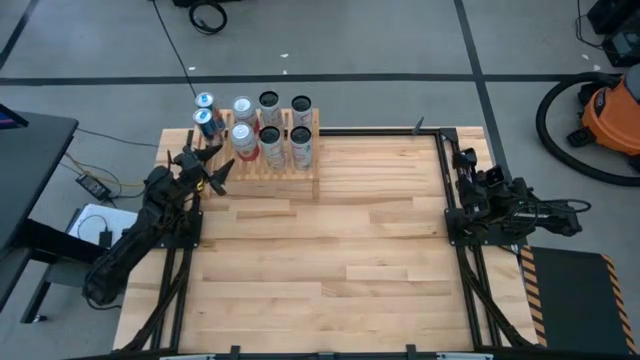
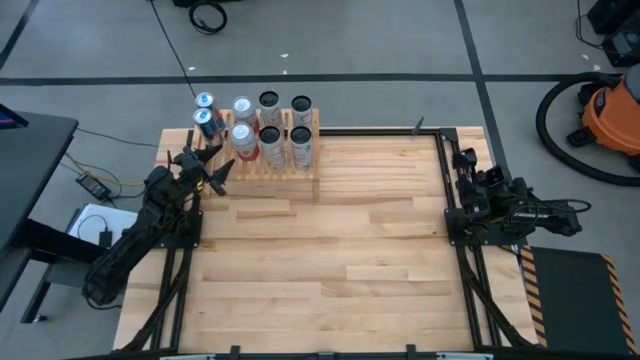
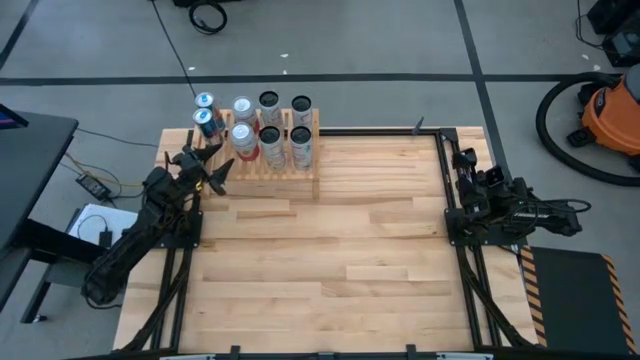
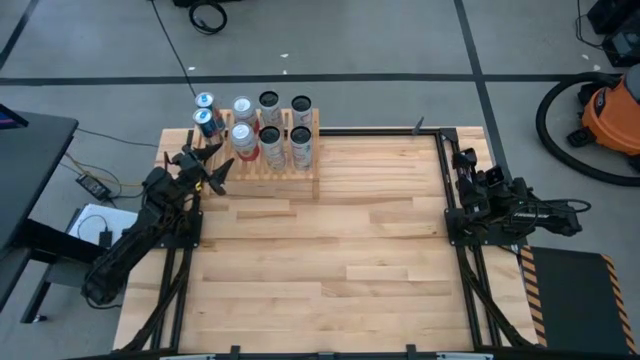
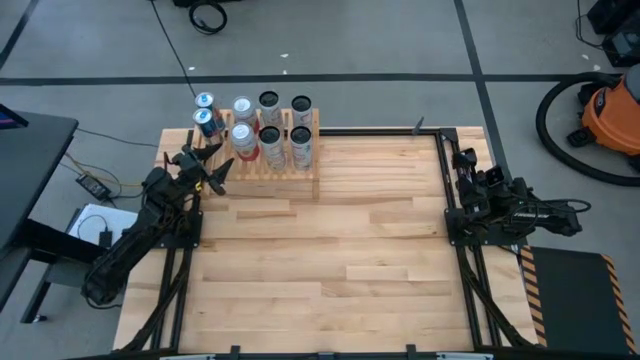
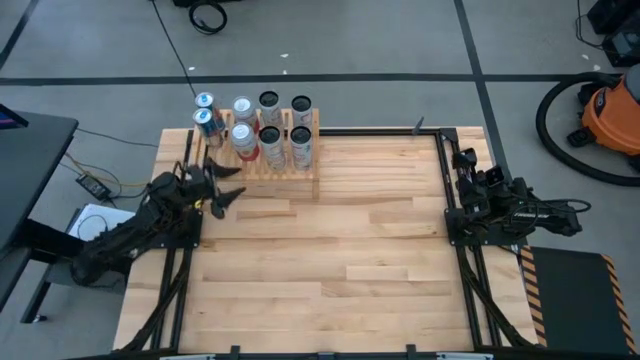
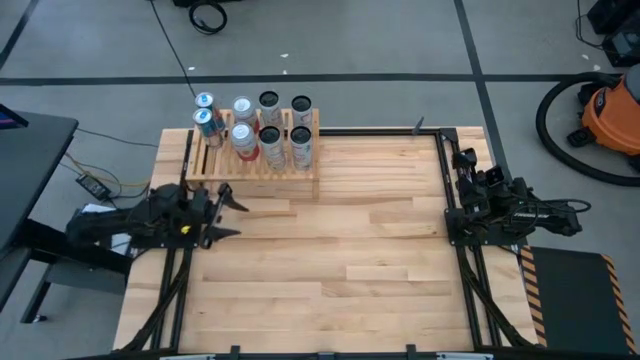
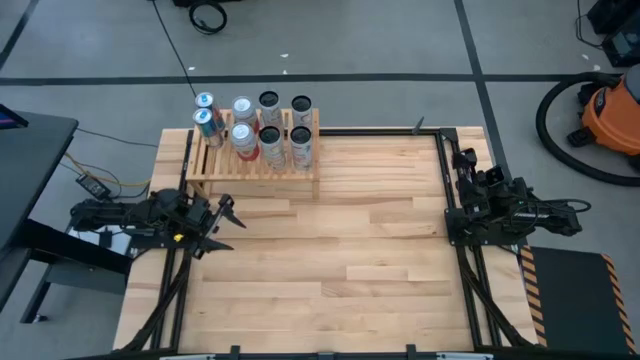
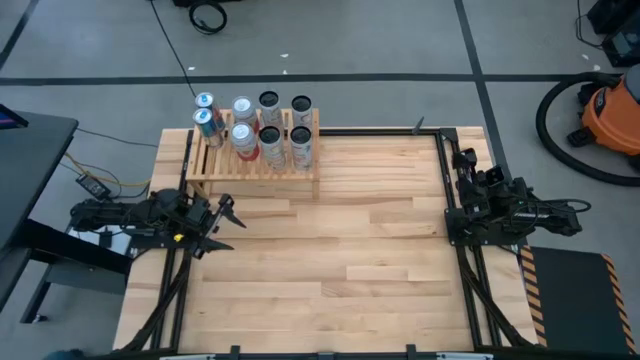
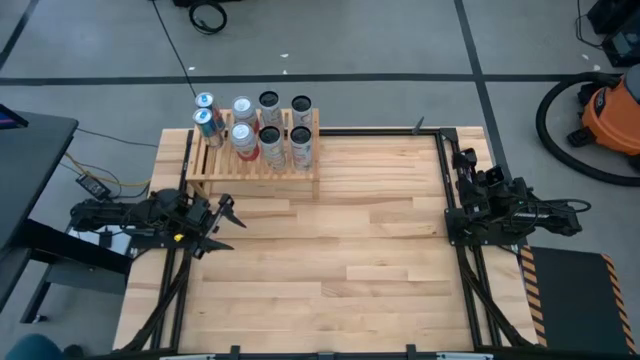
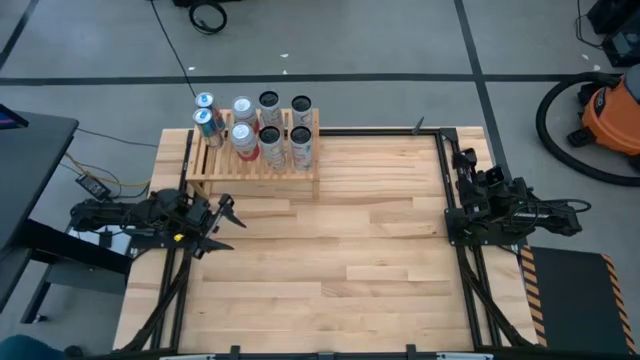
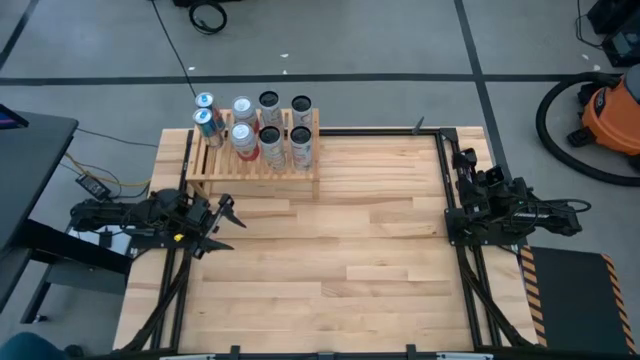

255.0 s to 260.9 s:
Task: Place canned beverage on shelf
Return to Home Position

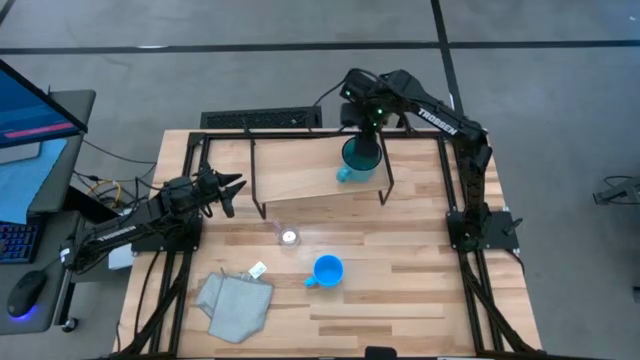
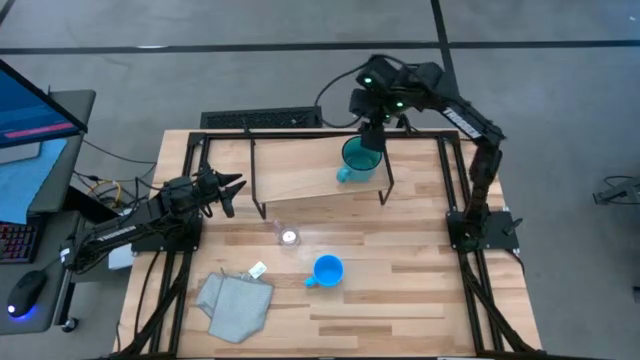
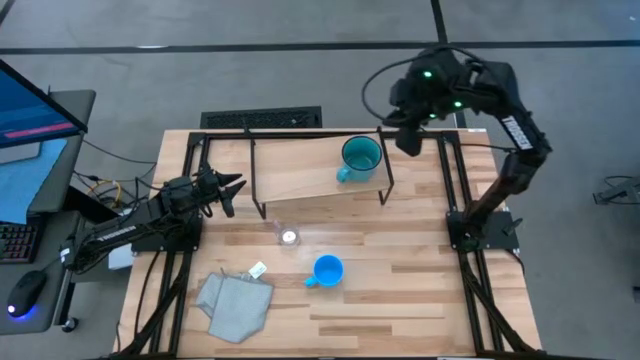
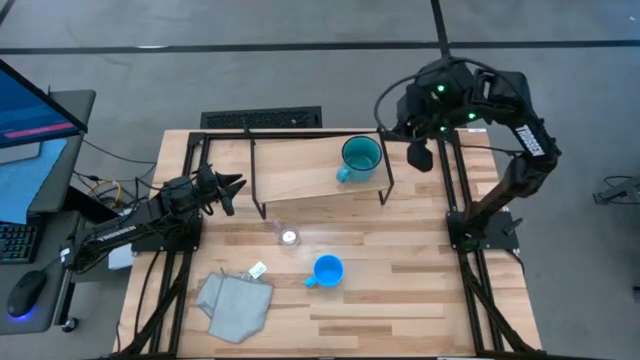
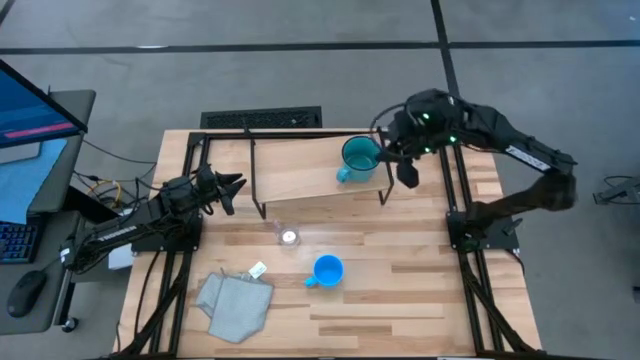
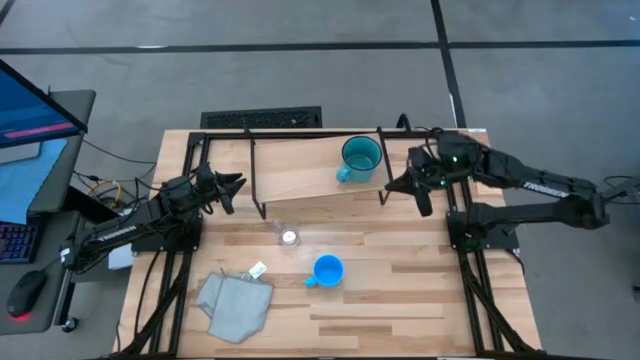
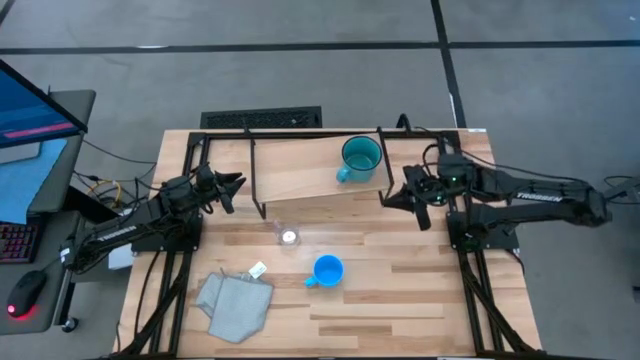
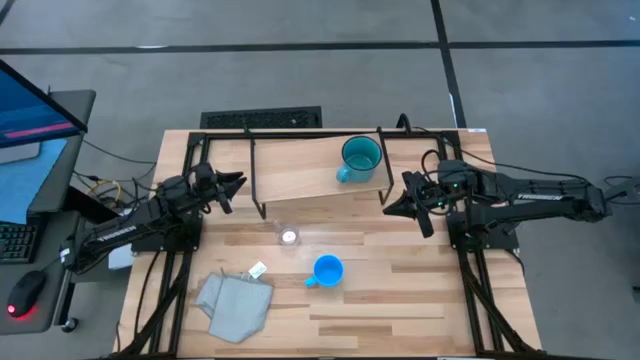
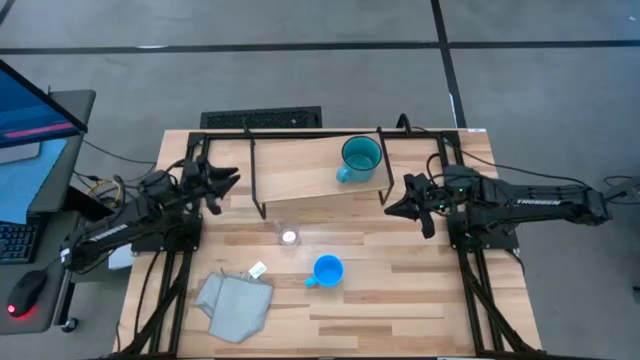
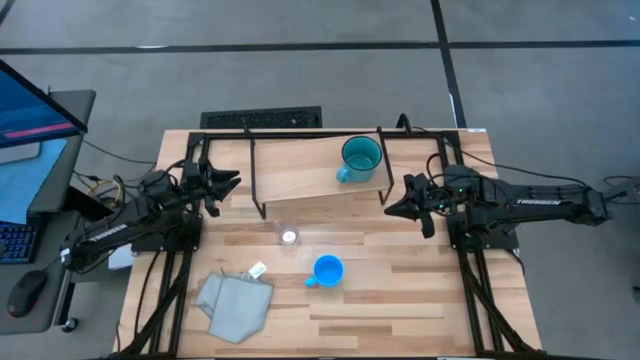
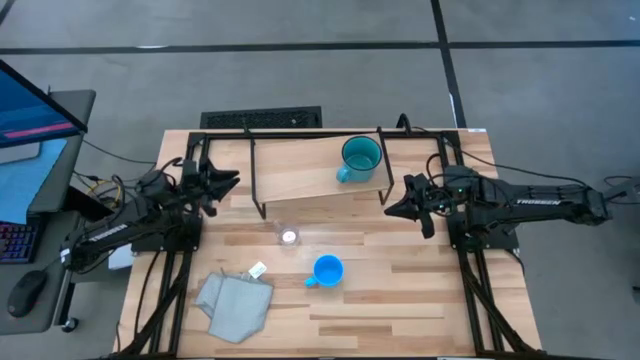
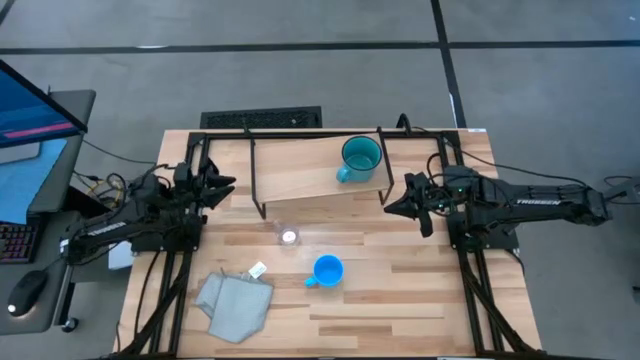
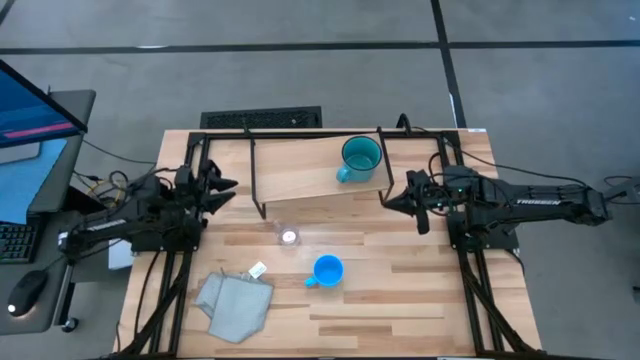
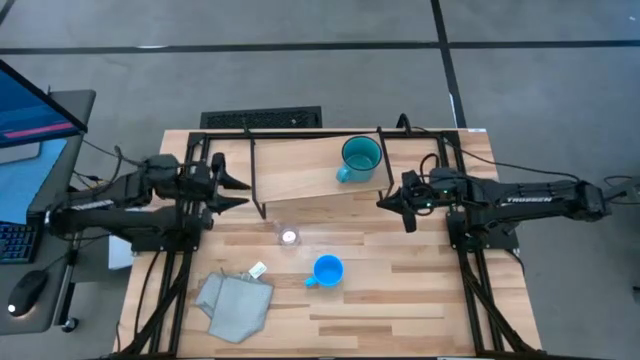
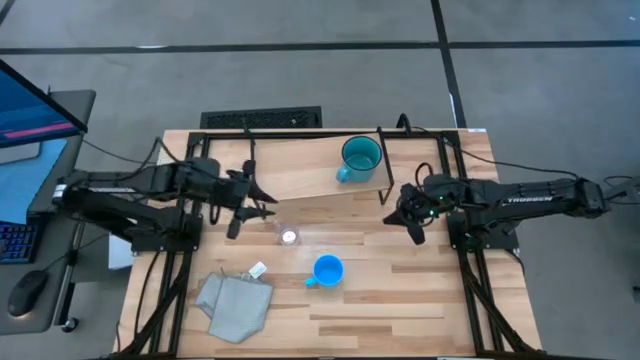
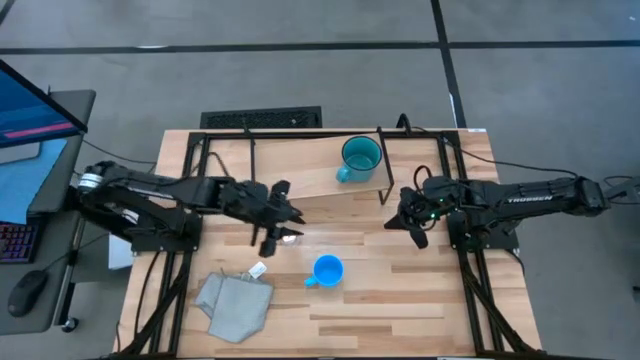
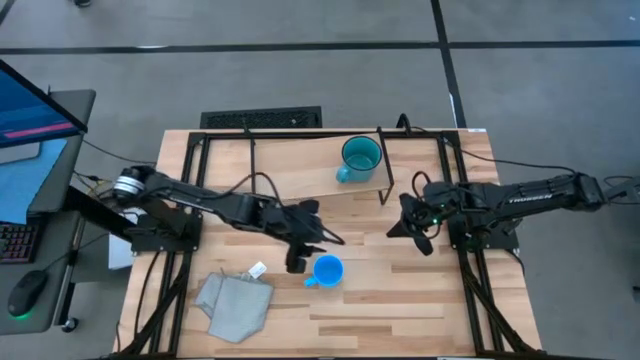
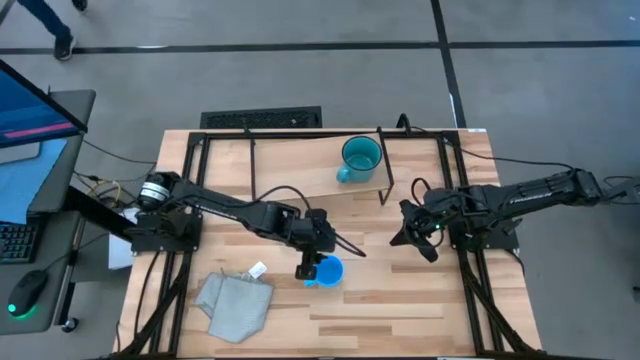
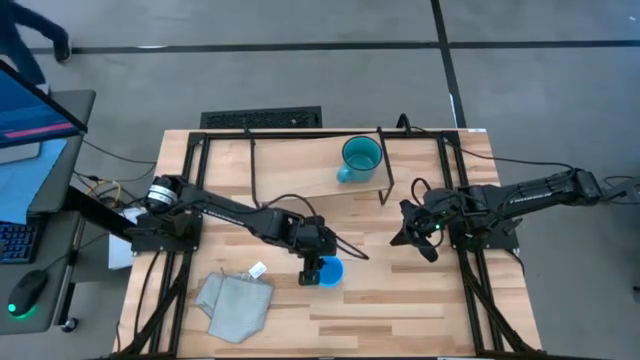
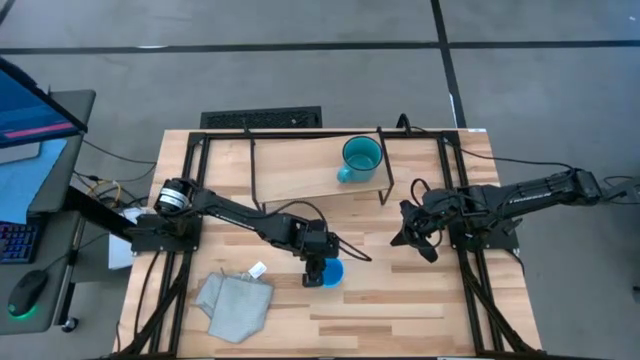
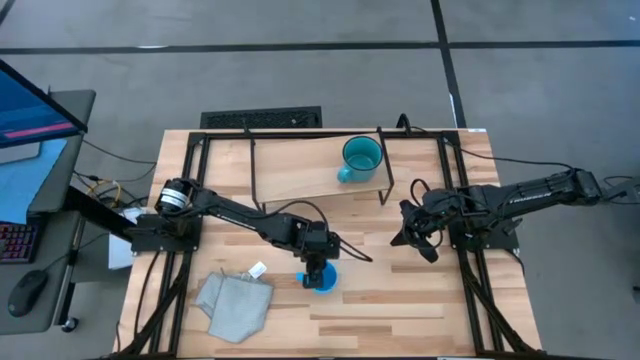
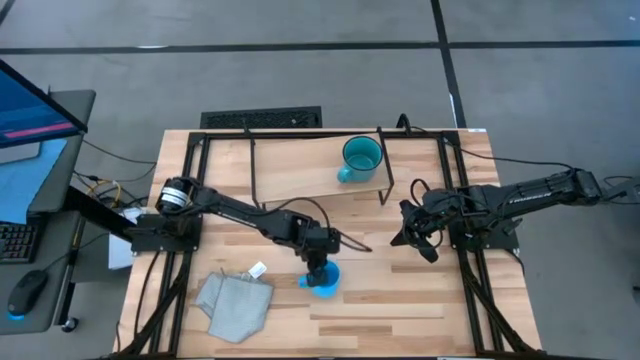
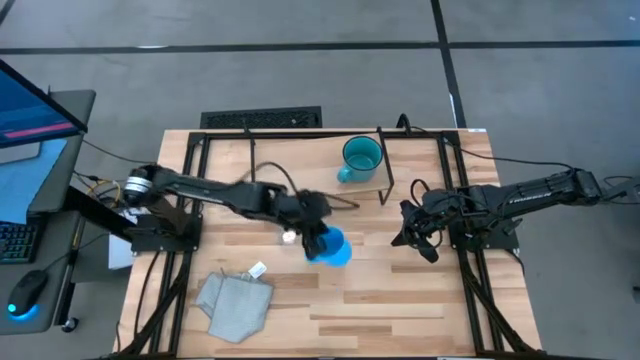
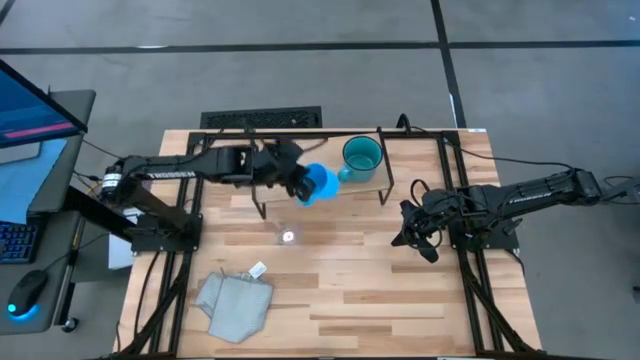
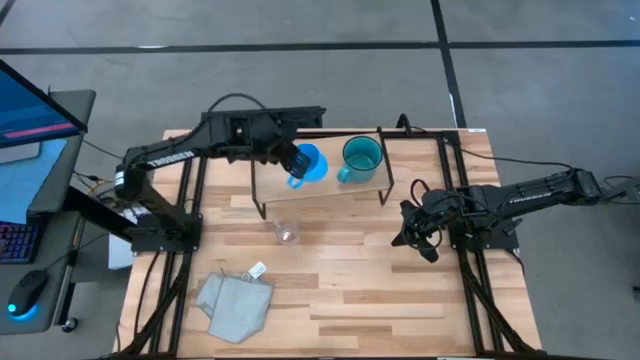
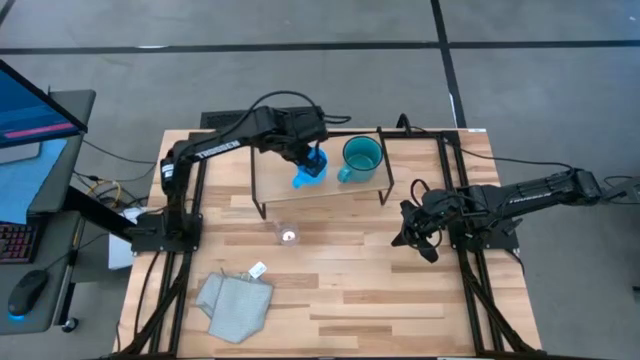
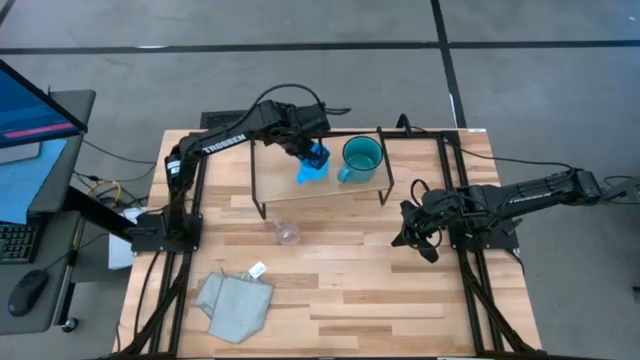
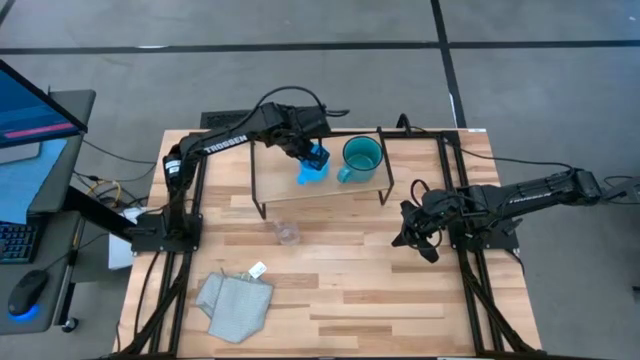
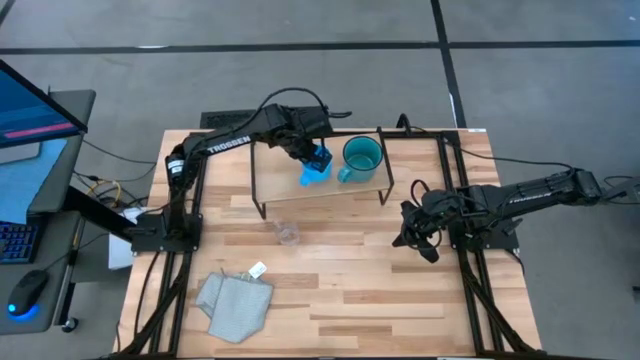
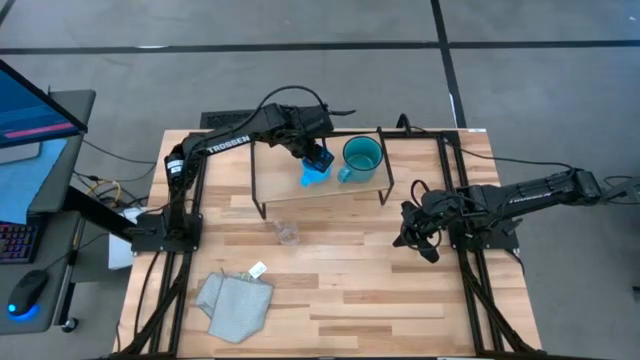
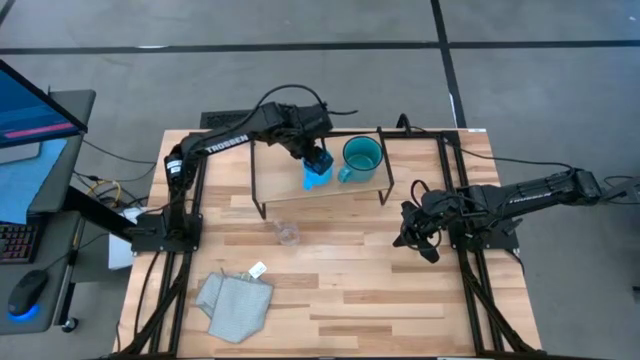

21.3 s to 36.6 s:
Task: Stack small to large cups/mugs on shelf
Put the blue mug on the shelf
